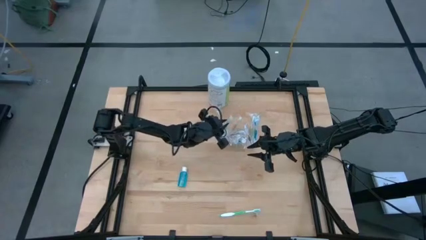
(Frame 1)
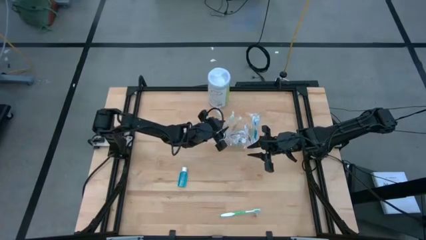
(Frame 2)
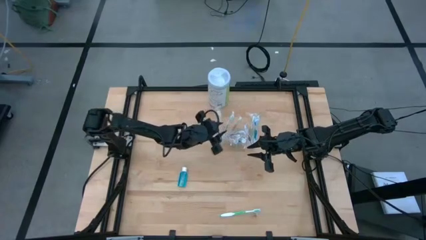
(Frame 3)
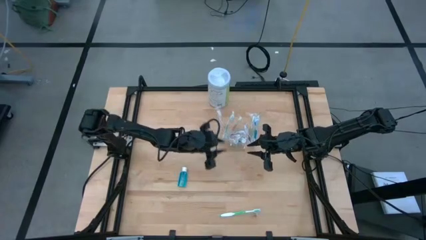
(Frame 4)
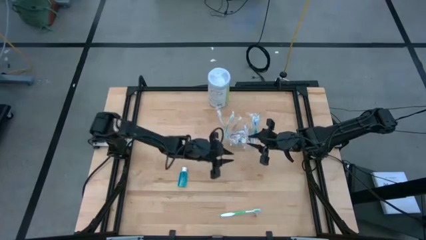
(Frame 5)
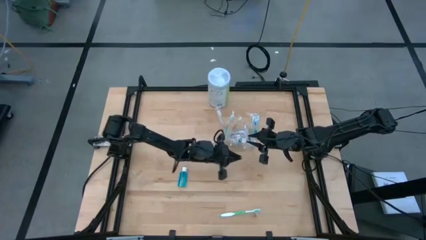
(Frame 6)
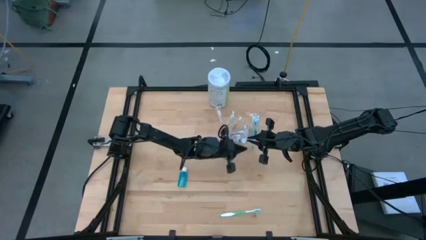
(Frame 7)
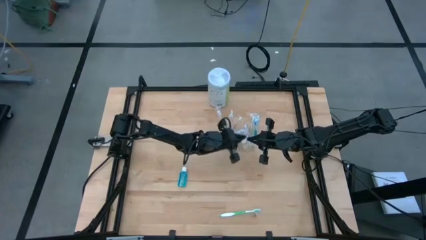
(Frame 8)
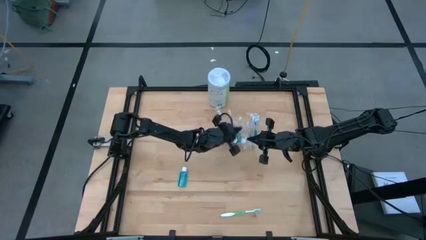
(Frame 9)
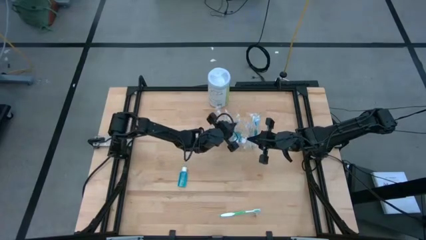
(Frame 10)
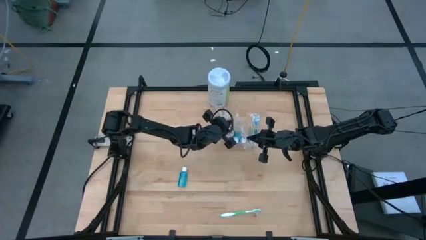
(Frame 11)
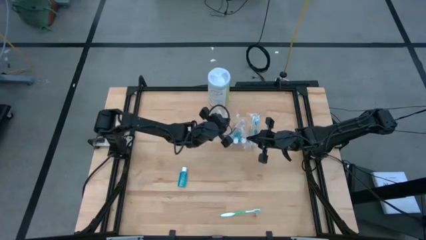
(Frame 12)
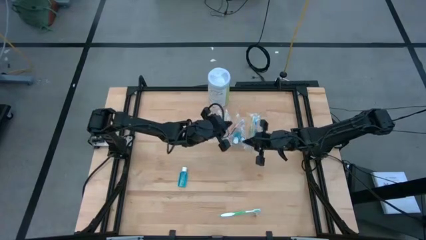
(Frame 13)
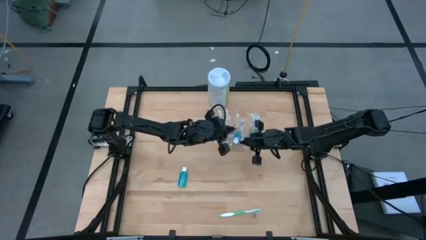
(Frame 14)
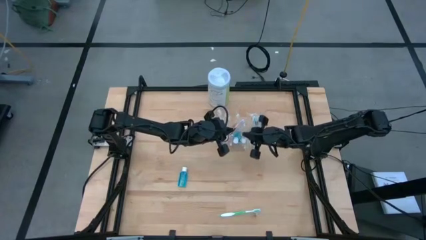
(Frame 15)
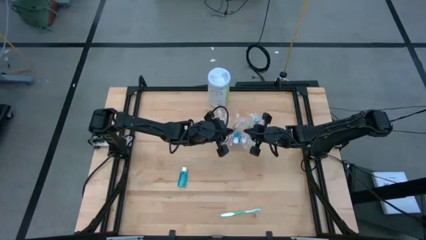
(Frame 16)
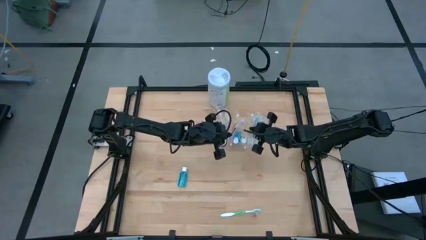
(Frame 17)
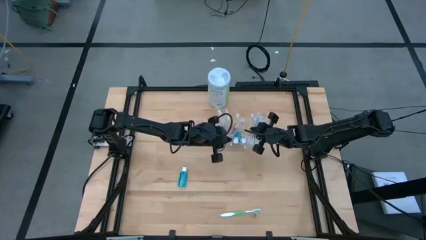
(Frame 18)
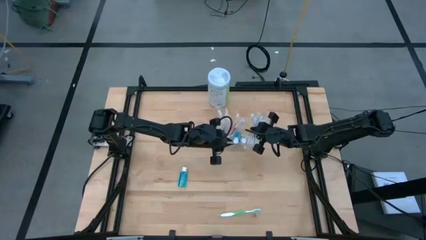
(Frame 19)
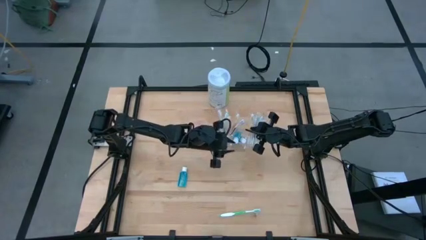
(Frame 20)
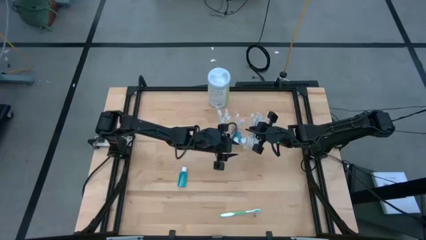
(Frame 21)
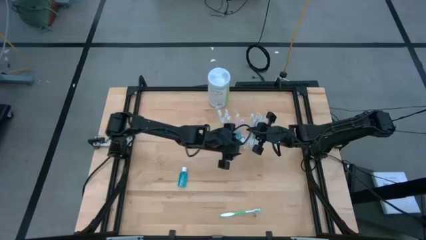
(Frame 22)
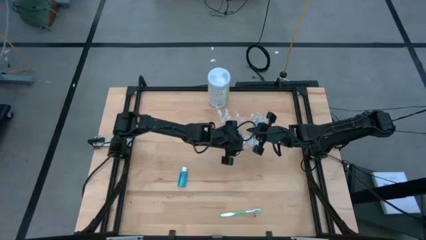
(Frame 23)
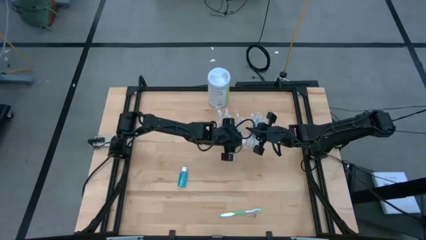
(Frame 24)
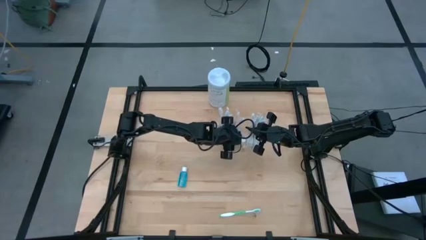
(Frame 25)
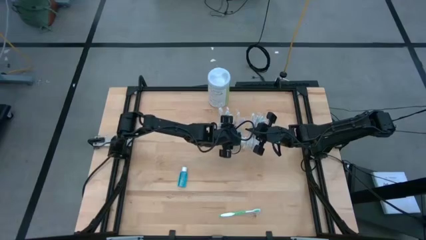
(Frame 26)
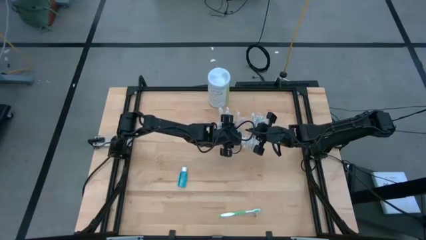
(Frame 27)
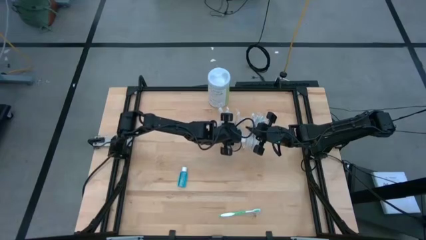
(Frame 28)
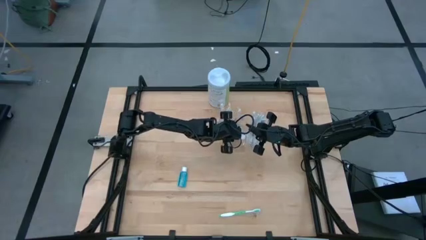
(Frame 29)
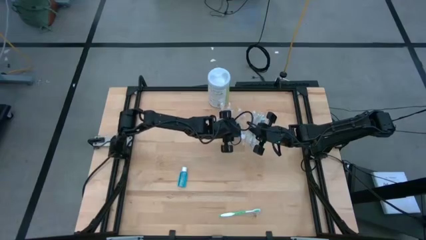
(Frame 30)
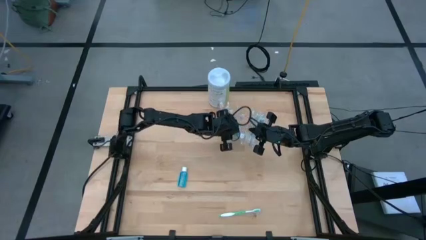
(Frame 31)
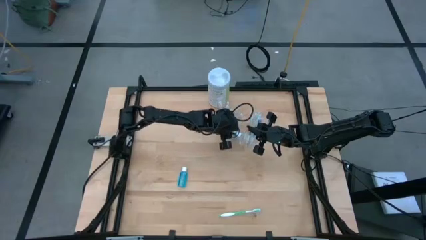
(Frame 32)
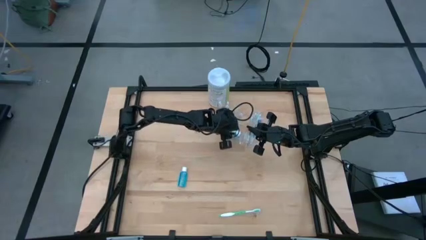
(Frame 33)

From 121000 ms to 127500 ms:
Task: Pick & Place toothbrushing station
Adjust the the dental care items in the transparent organizer

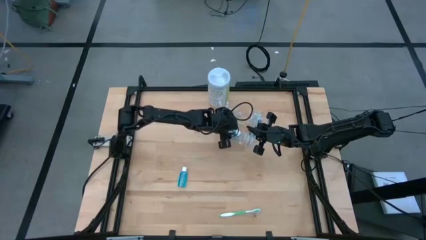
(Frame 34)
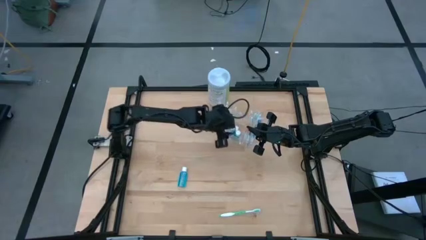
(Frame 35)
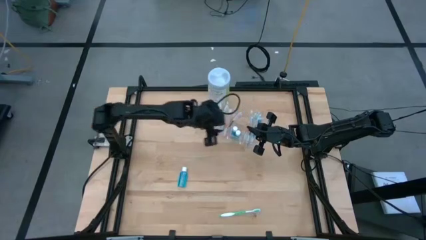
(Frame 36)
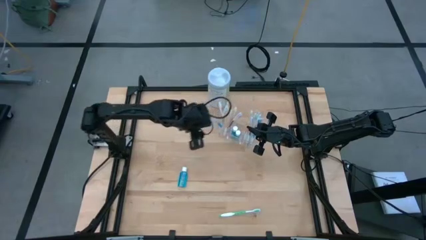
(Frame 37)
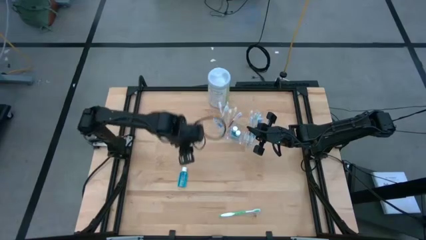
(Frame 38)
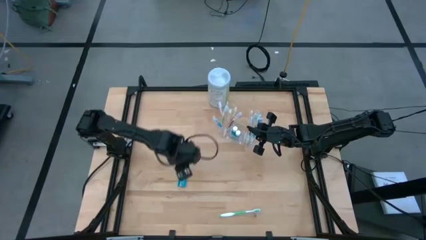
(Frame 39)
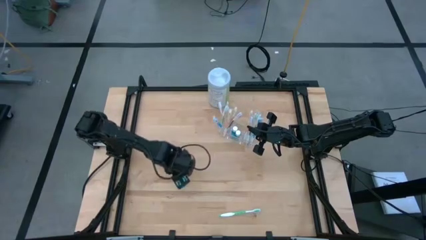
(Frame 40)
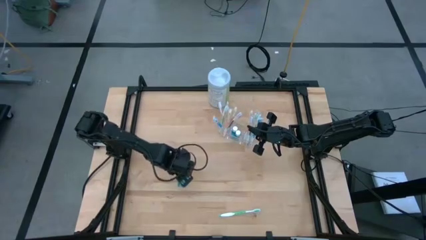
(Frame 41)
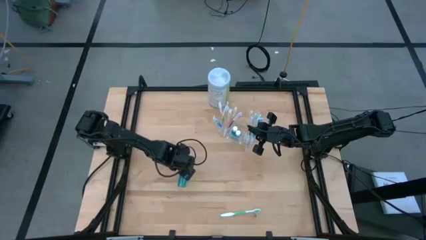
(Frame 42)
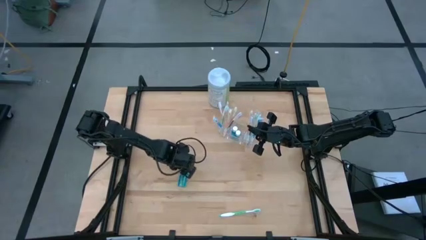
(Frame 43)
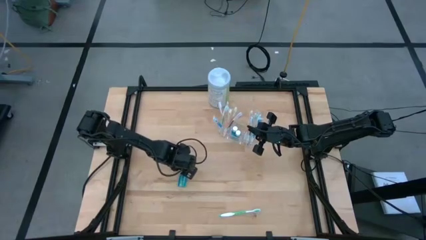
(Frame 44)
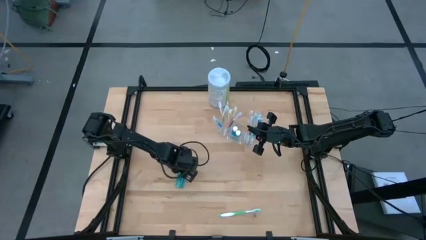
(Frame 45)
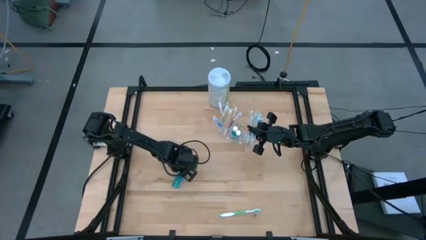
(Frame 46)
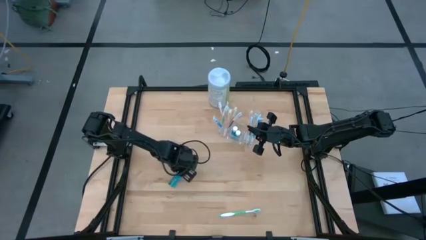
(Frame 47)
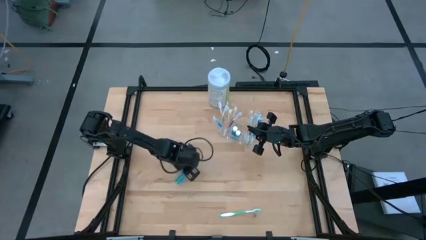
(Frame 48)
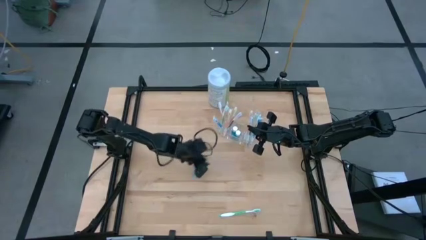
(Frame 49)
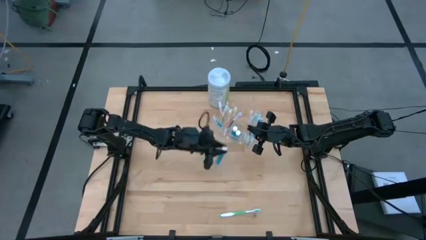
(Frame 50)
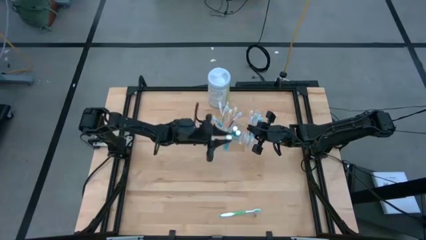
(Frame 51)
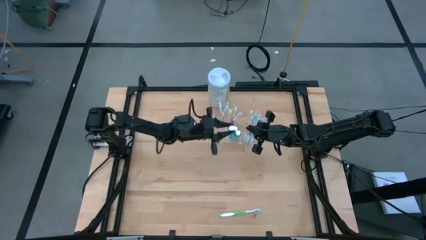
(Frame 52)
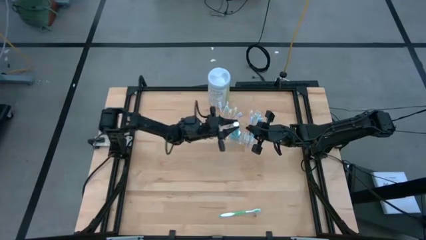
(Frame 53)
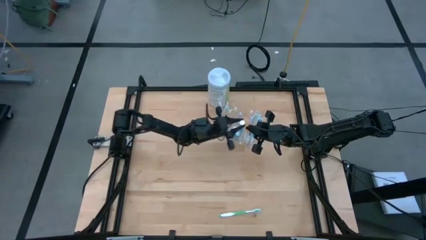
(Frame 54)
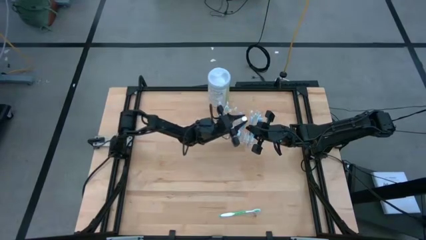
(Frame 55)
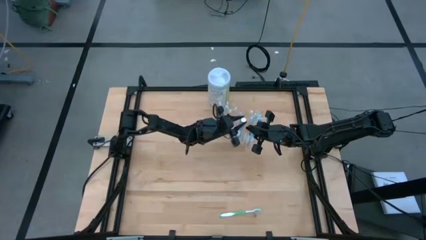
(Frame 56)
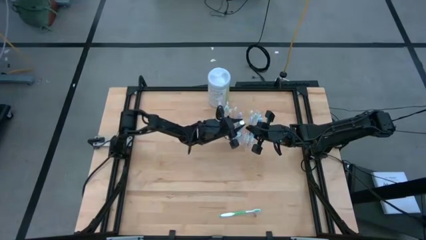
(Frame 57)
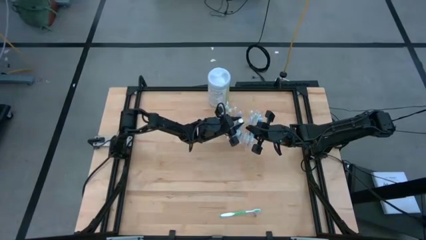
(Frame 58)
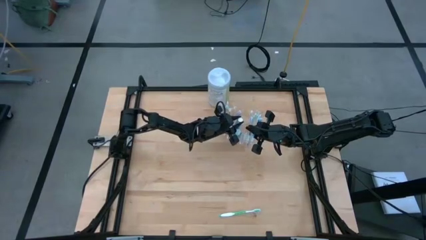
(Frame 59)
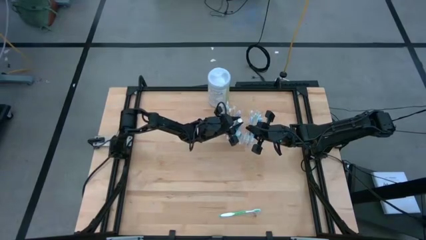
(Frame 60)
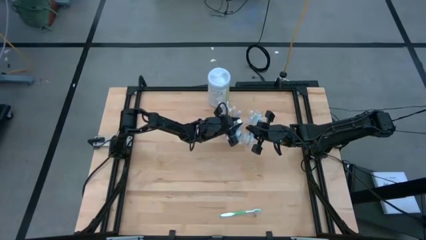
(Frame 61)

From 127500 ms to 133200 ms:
Put the blue mouthwash into the transparent organizer

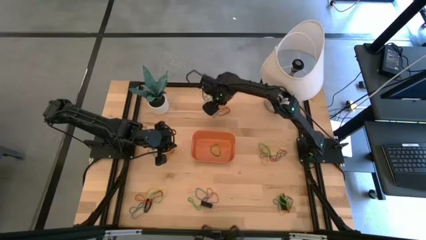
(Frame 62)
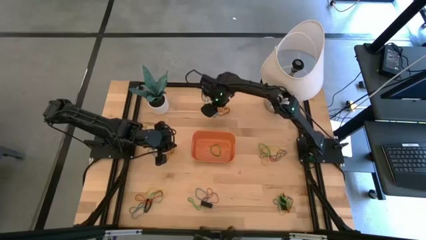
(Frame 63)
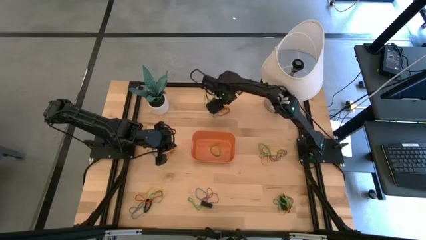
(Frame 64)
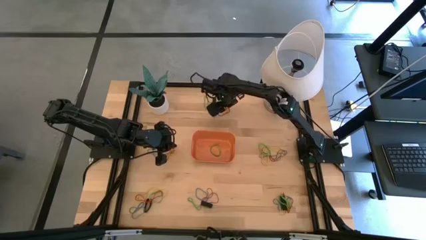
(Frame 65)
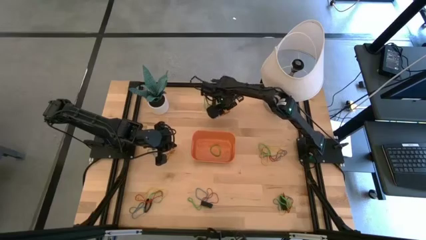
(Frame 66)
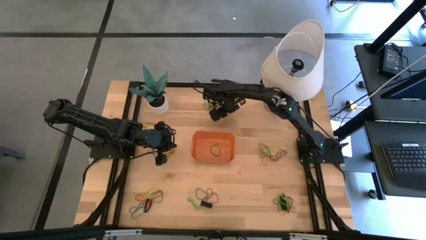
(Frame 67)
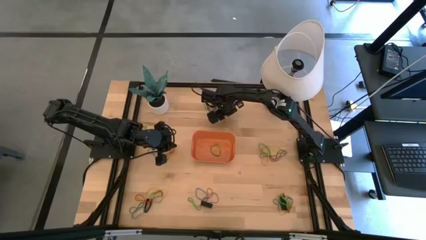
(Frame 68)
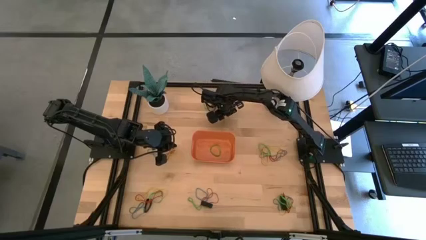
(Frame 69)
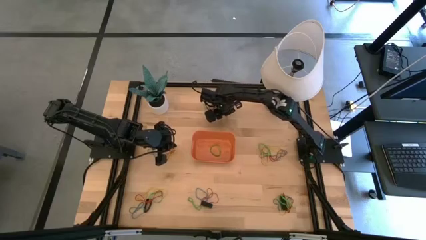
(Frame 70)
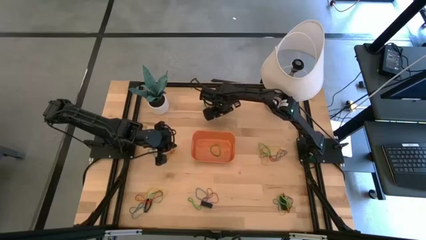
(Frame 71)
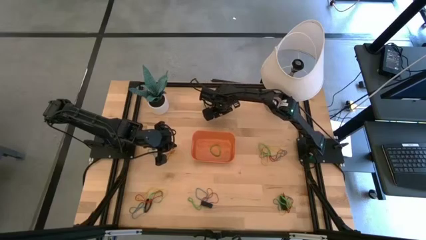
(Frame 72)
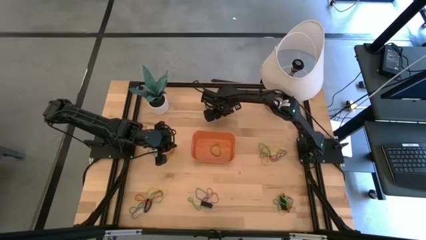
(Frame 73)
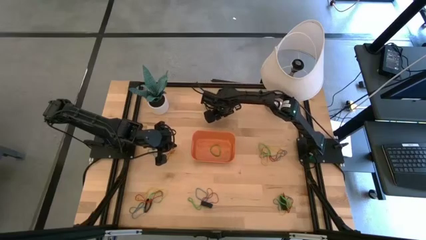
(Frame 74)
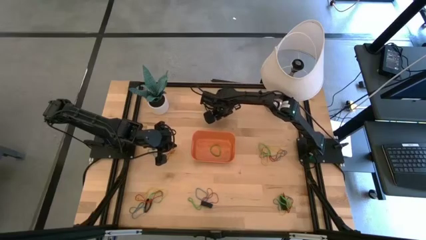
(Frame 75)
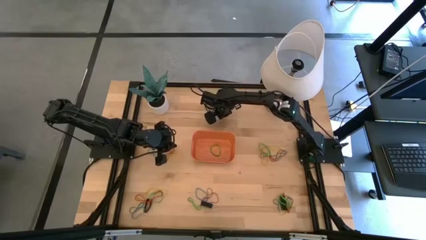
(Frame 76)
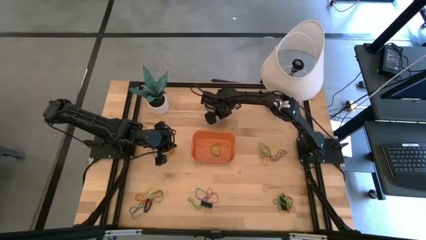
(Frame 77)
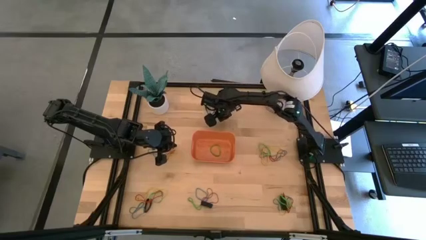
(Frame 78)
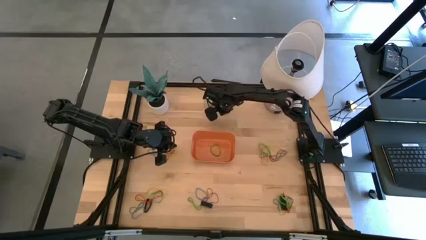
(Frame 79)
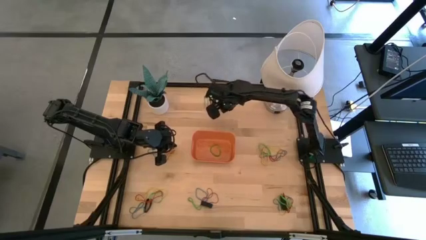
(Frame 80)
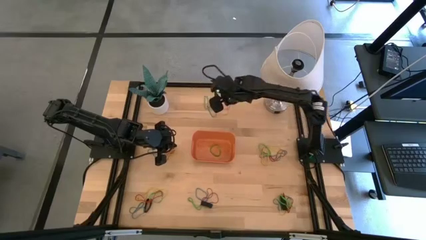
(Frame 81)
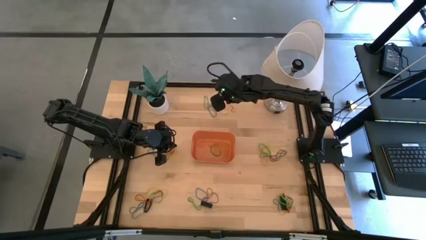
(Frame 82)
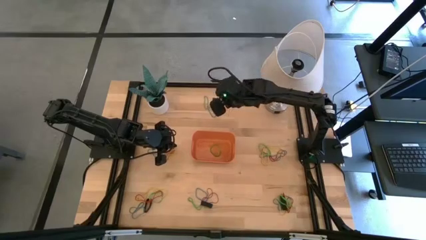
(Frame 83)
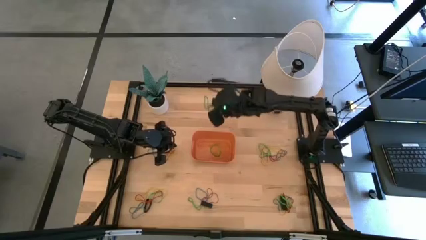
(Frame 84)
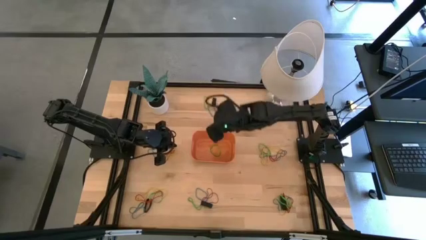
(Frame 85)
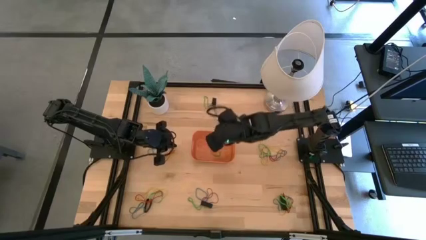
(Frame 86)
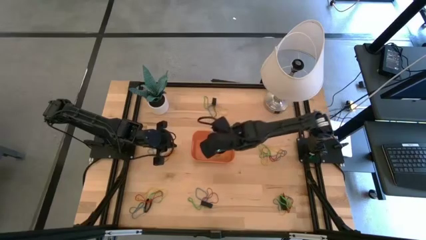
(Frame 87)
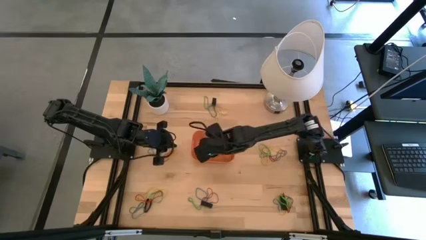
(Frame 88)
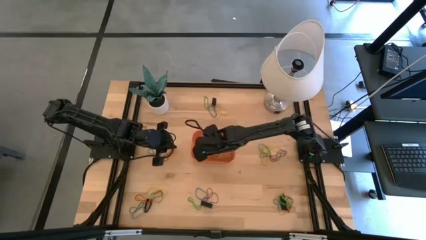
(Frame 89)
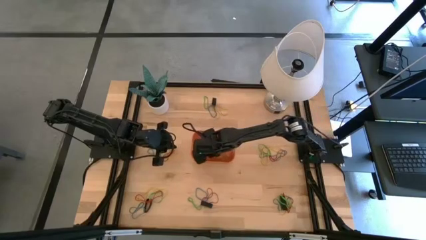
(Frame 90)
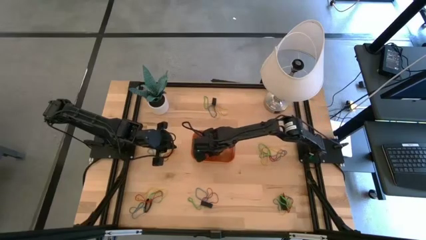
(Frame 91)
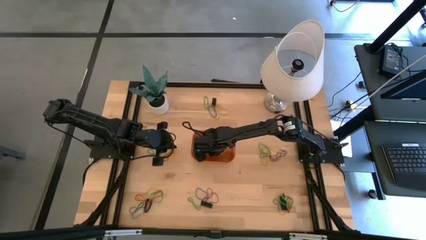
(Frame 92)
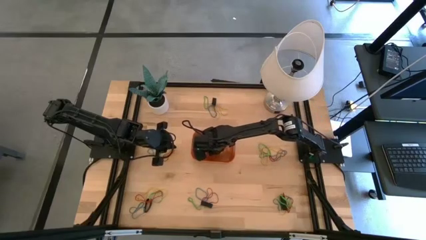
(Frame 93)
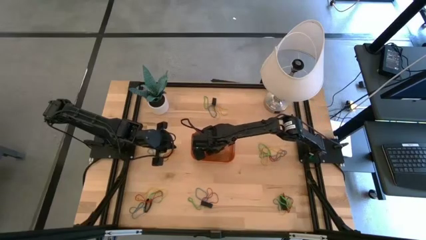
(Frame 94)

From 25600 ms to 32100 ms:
Task: Pick and place rubber bands into bin
Put the red rubber band into the orange bin
